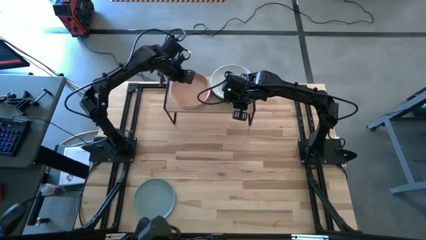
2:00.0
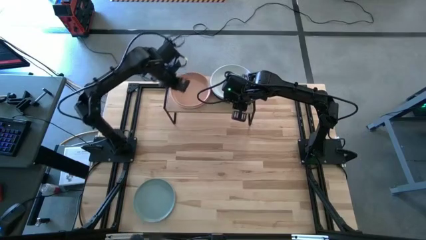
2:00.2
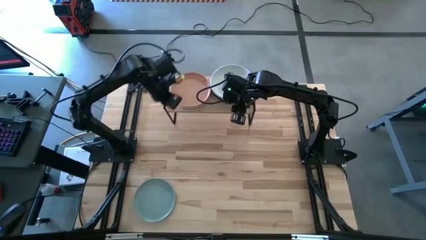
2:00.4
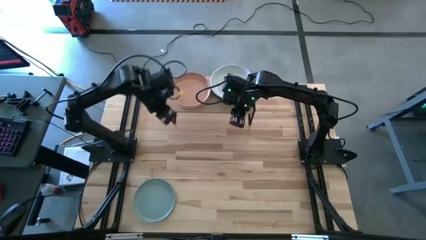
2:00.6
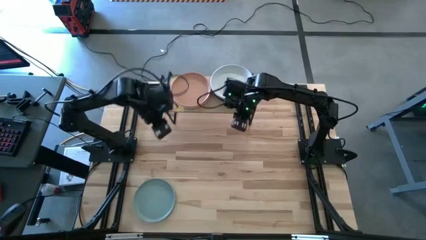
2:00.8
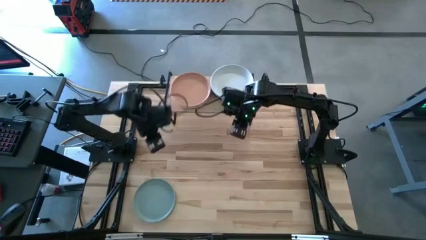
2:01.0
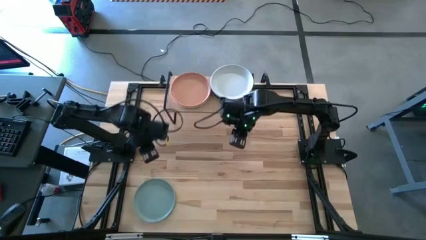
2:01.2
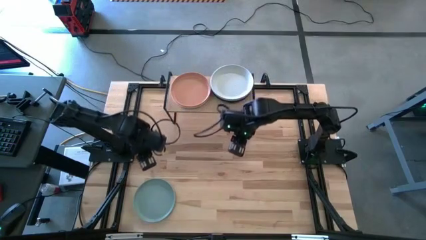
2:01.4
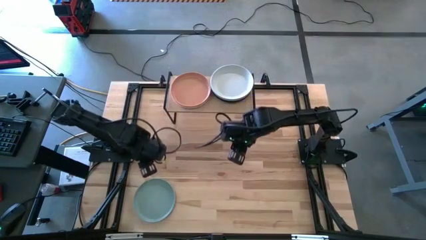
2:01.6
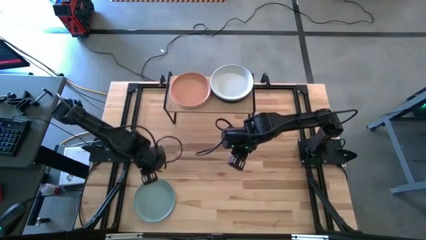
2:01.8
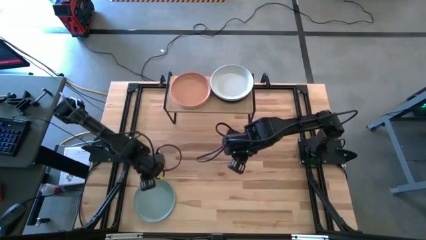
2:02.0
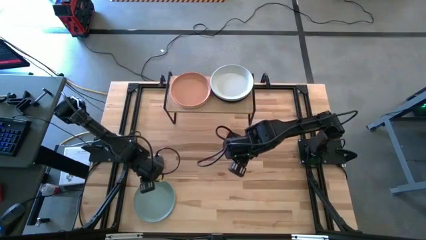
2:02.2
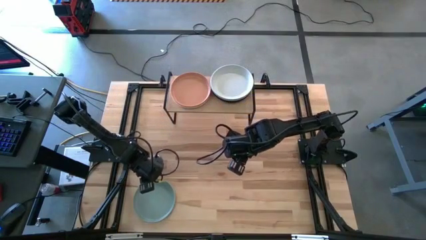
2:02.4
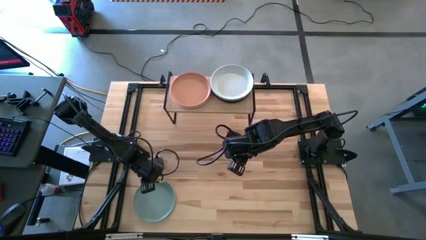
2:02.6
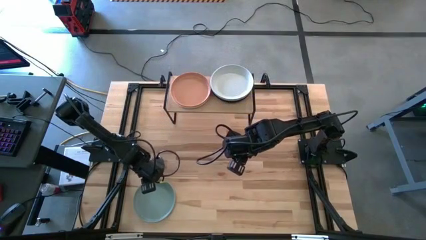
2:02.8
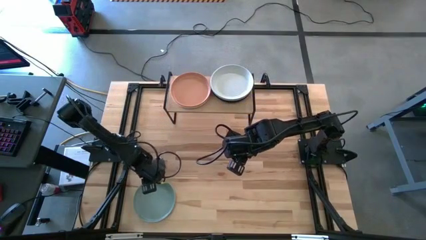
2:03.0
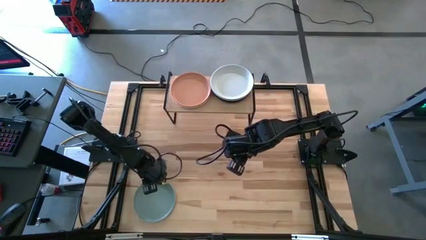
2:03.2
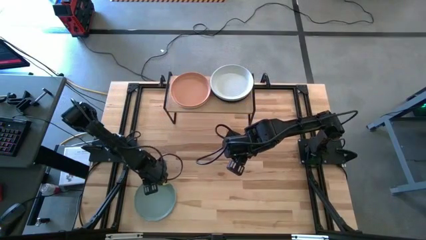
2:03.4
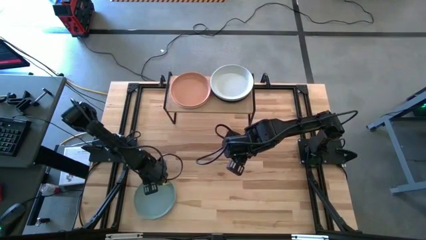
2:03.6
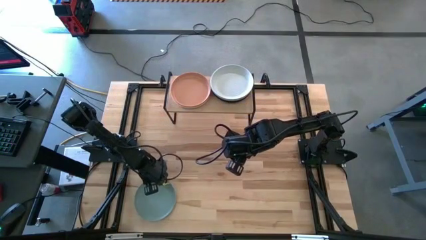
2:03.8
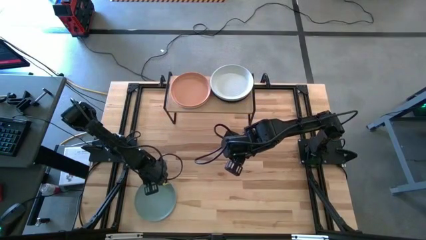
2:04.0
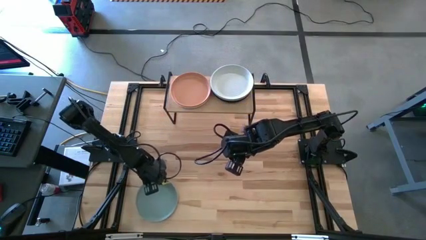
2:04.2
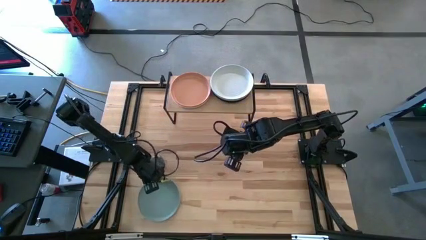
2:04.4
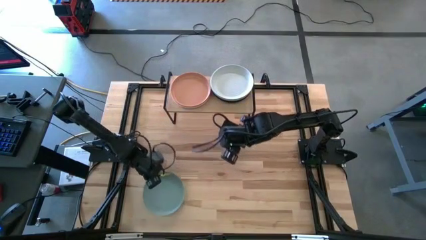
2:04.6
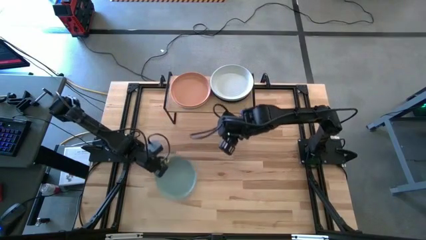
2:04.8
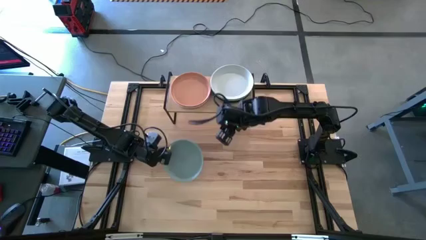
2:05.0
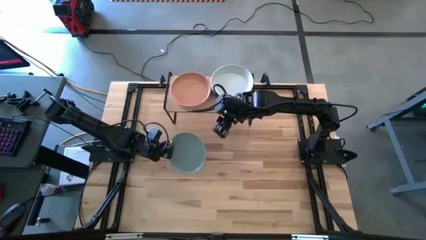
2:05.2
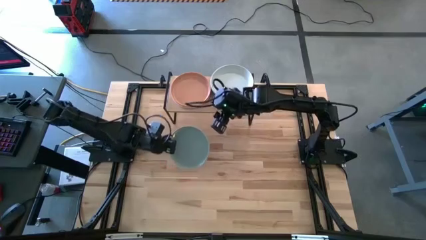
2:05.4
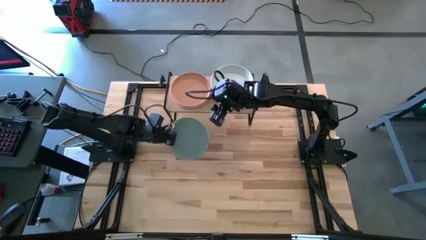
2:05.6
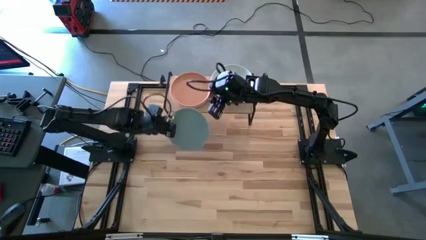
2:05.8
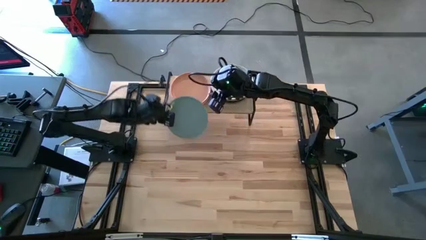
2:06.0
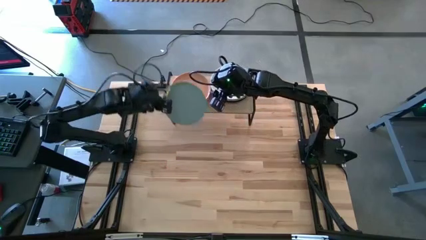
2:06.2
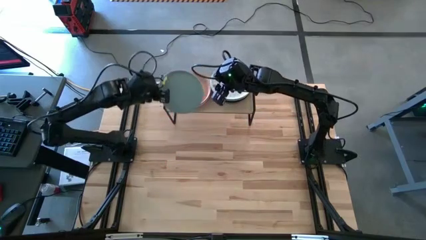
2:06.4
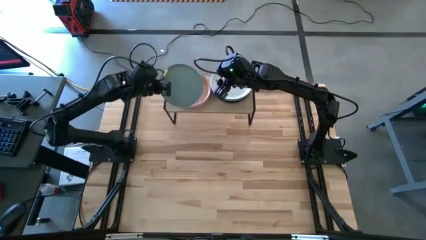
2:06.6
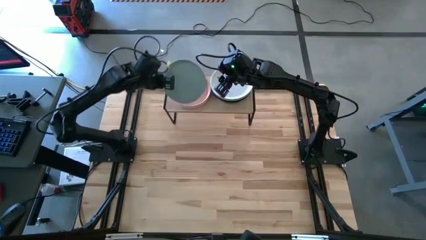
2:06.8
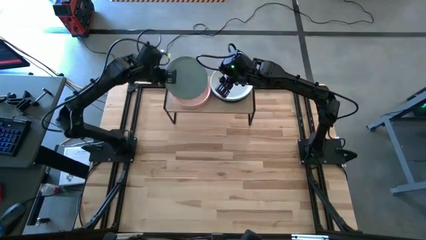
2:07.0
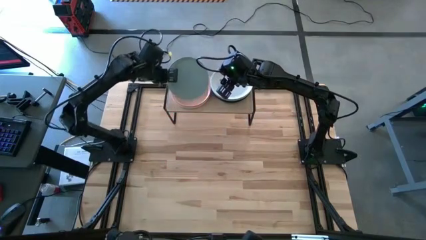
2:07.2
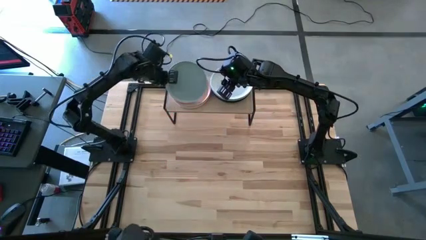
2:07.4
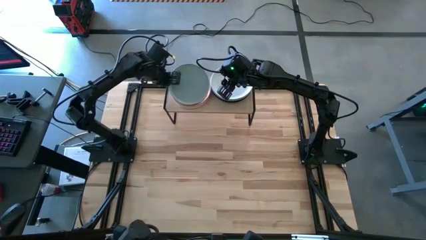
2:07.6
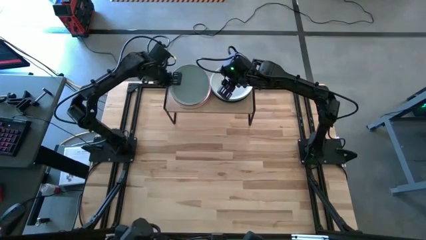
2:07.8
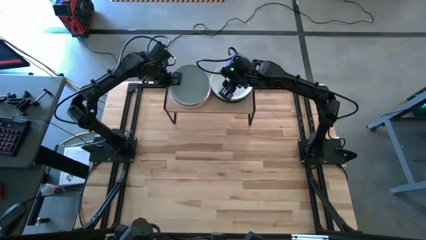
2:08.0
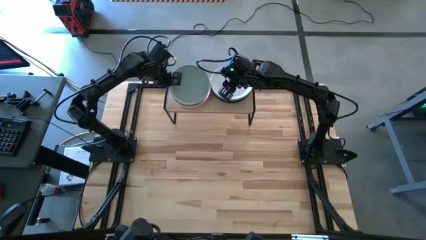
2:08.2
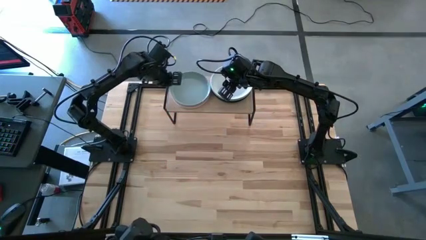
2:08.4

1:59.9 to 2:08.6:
Task: Place and stack plates onto a shelf
Stack the light blue plate on top of the orange plate

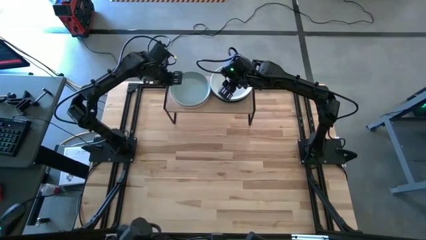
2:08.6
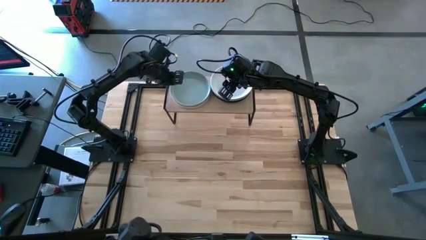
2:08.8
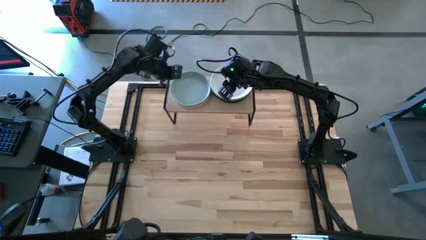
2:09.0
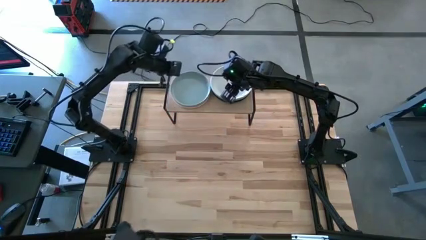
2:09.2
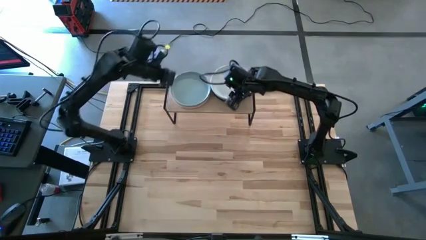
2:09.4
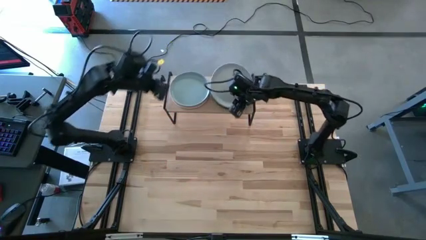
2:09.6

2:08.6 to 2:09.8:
Adjust the white plate on the shelf

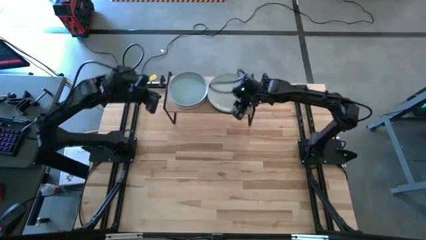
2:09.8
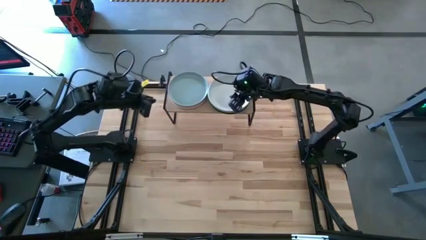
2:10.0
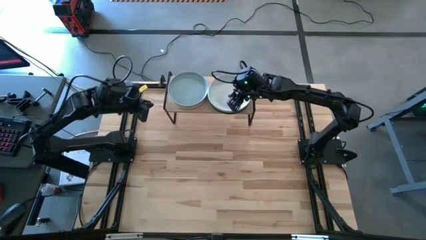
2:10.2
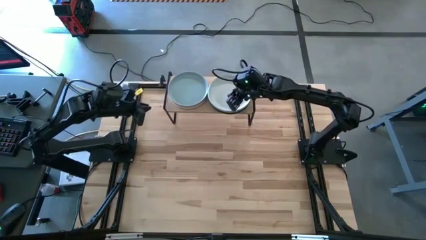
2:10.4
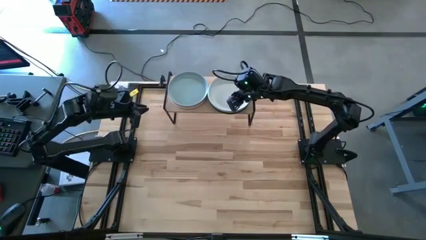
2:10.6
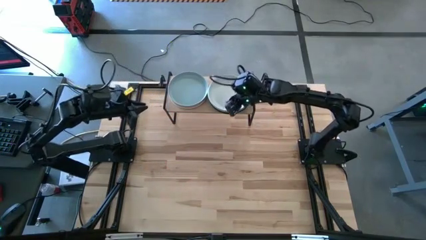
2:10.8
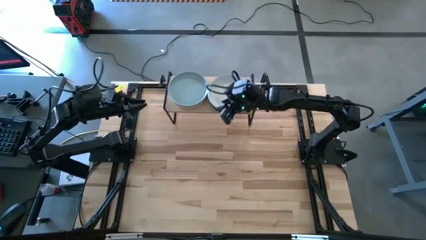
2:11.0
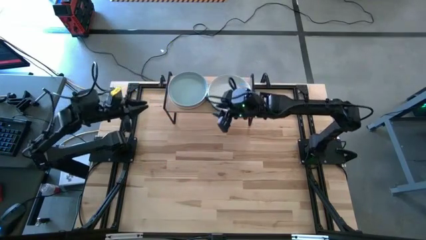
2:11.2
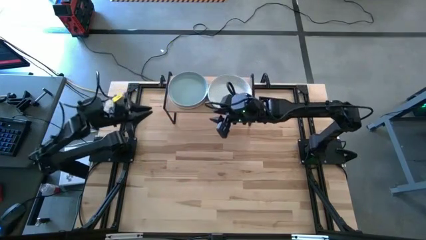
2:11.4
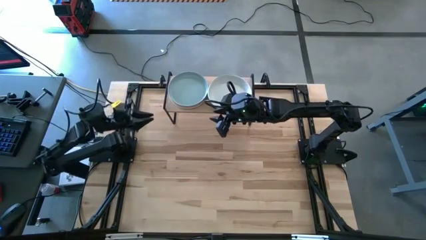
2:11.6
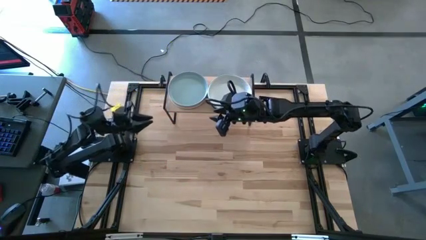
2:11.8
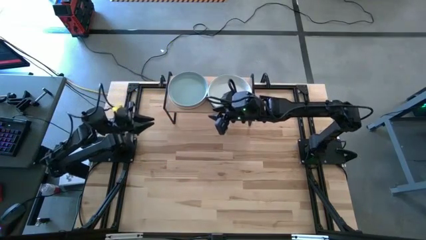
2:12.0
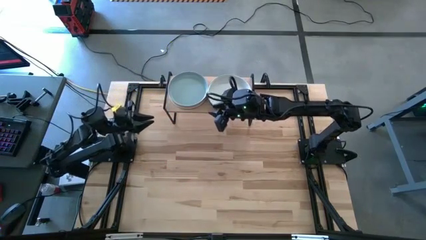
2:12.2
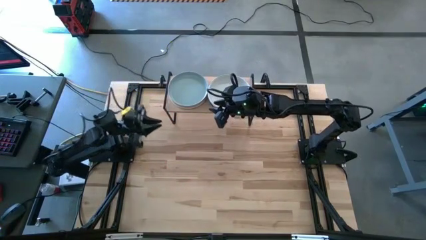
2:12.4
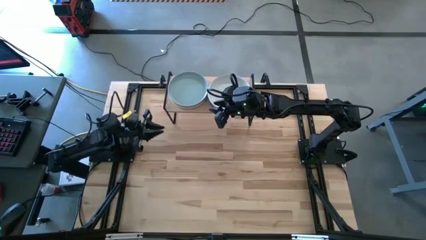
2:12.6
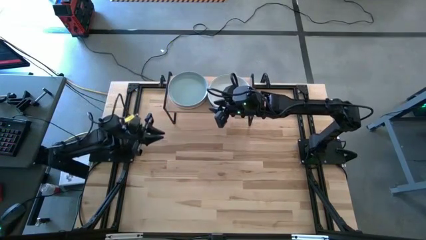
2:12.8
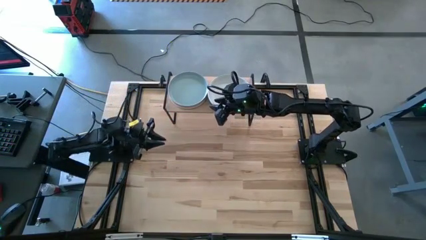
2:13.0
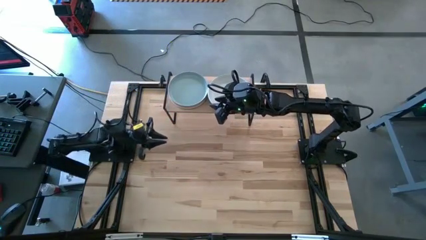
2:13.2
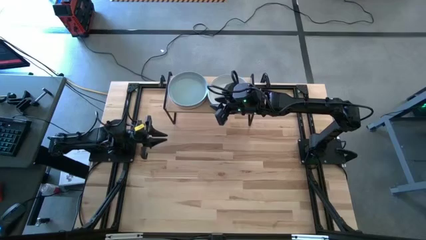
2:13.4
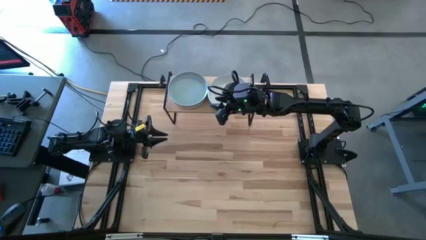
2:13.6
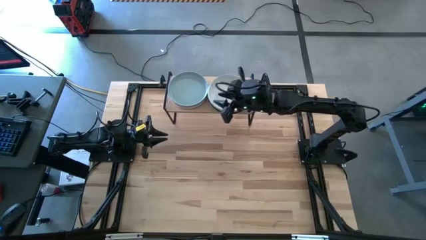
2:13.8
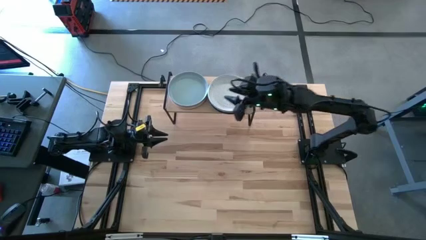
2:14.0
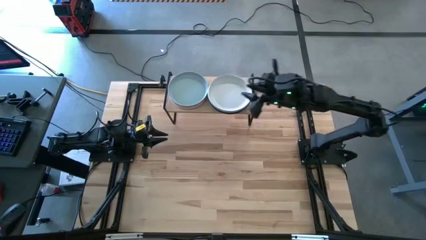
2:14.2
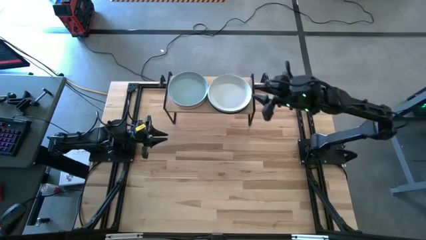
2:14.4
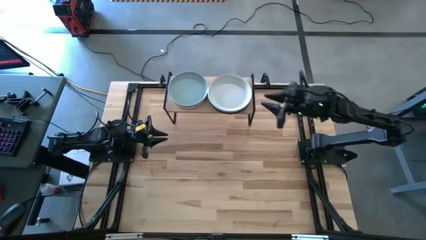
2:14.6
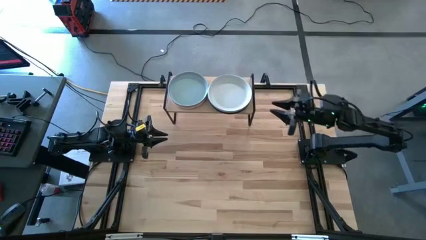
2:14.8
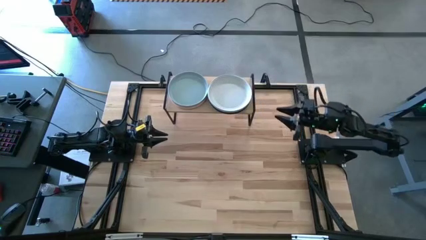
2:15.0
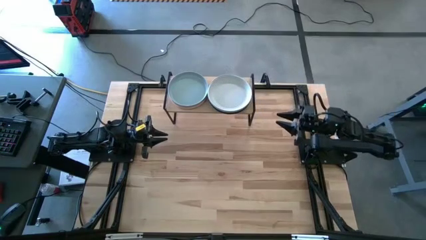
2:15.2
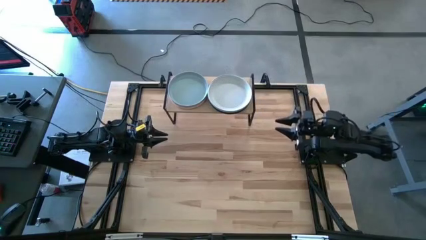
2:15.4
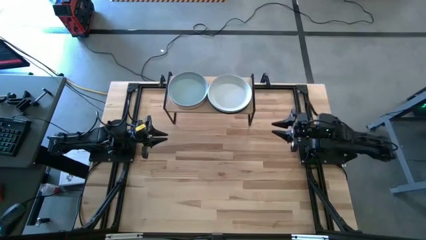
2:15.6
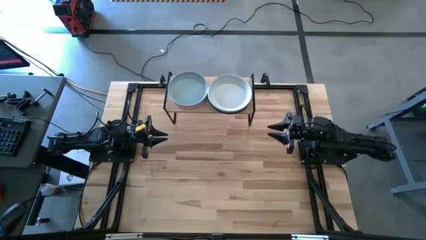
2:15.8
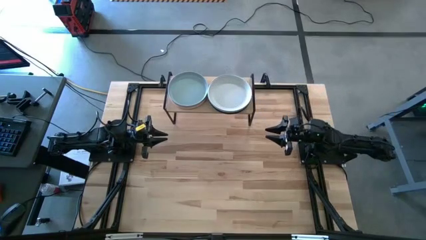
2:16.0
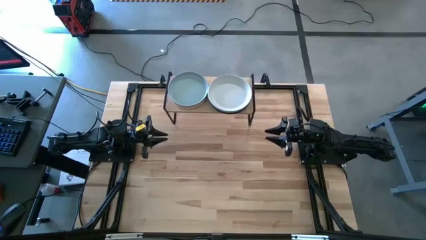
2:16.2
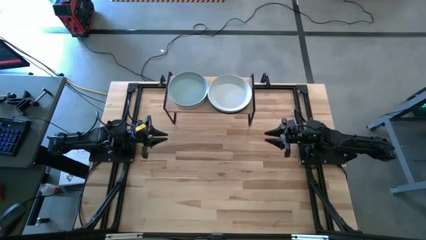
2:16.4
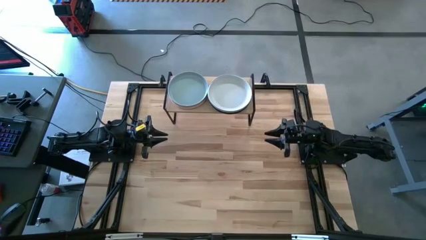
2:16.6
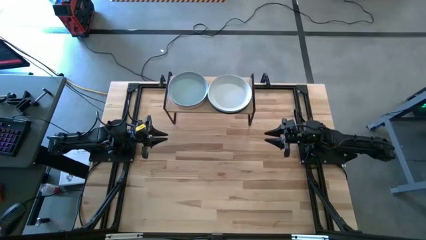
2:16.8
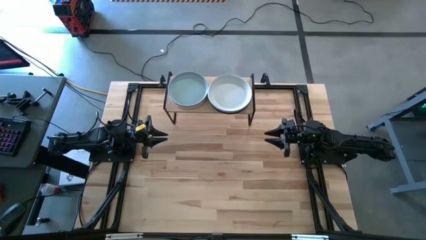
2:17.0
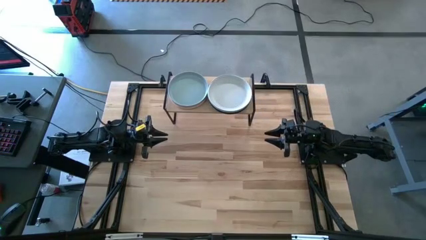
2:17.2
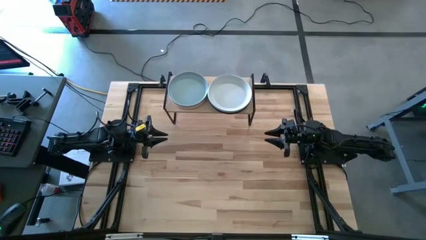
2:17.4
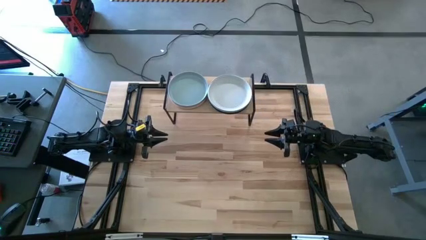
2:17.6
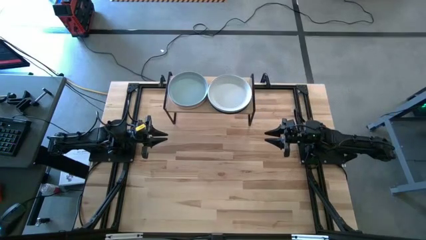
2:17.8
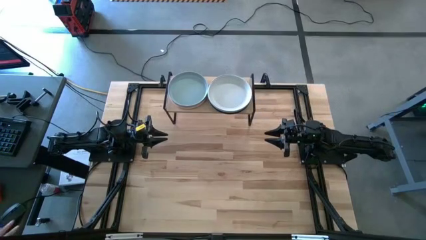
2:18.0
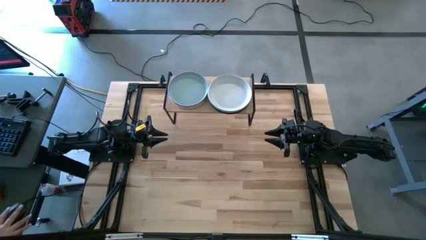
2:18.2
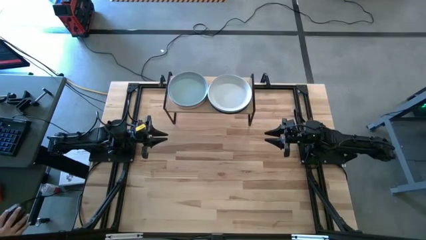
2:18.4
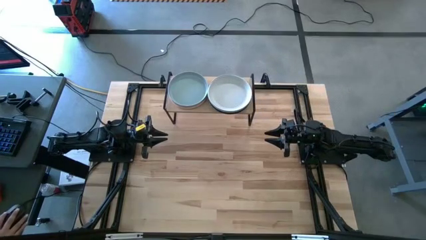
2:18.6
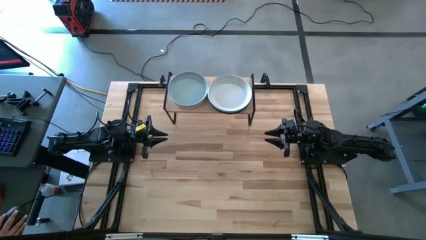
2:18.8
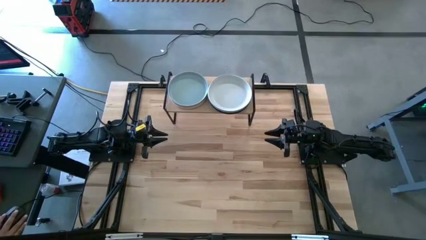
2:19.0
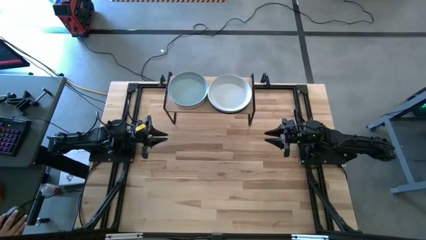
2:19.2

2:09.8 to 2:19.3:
Return to Home Position
